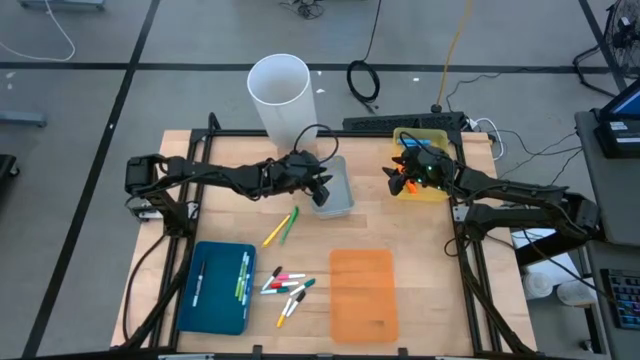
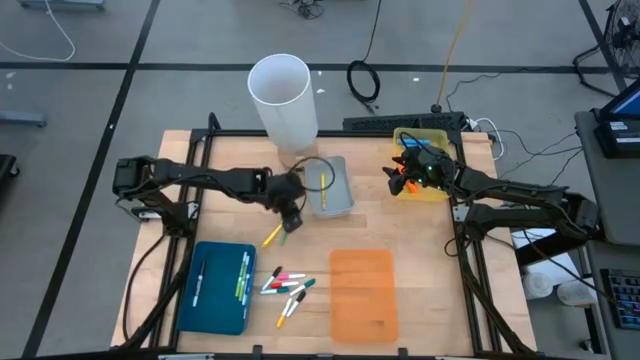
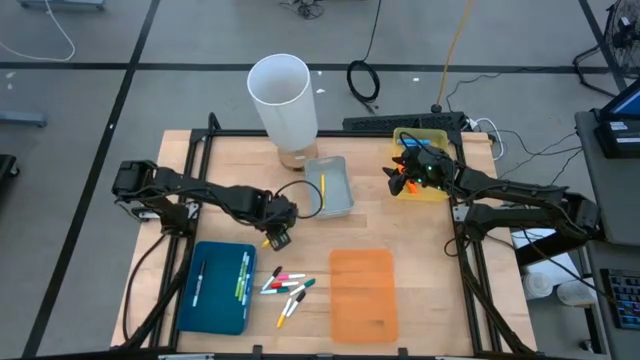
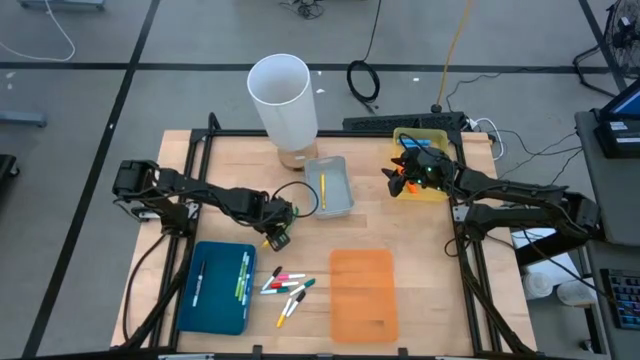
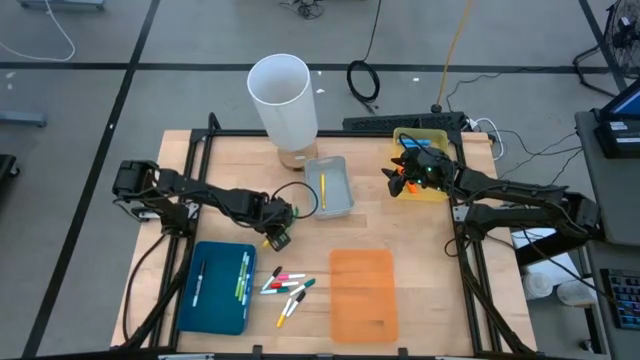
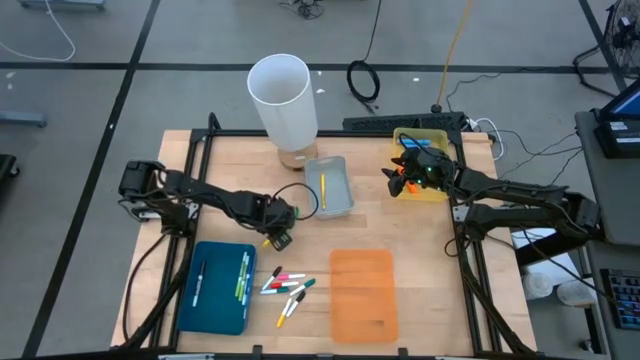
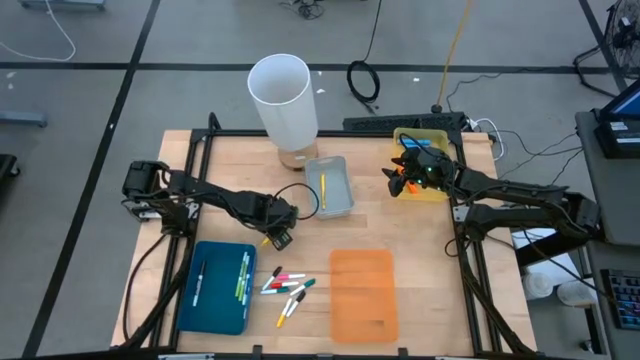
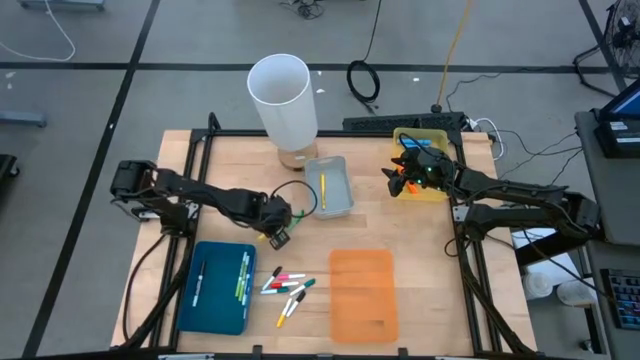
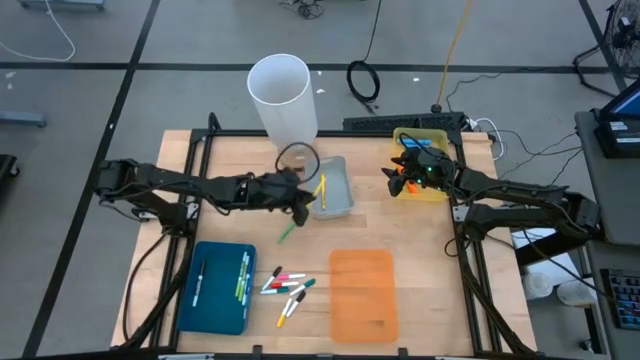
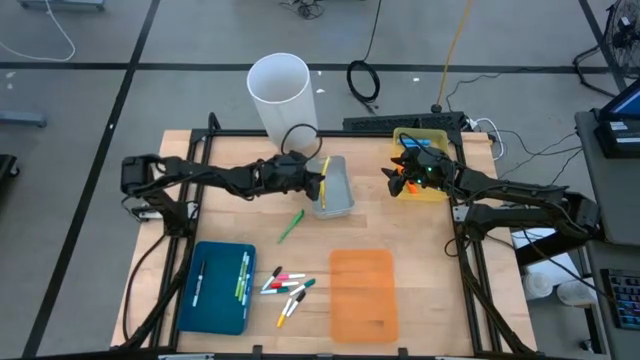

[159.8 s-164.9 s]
Task: Pick & Place Markers
Put the yellow pen in the gray bin

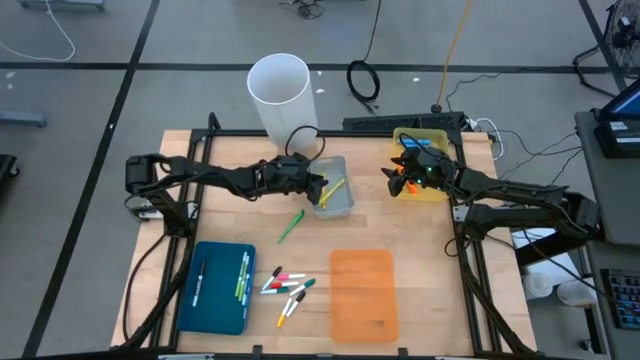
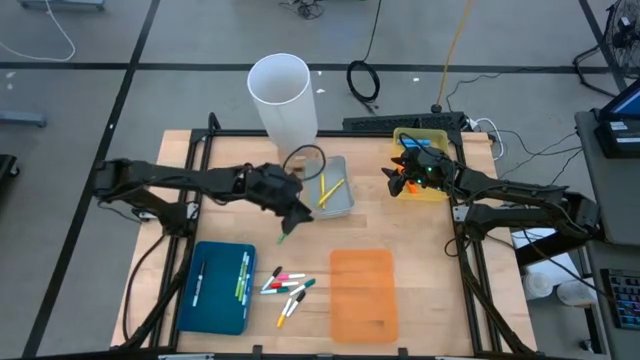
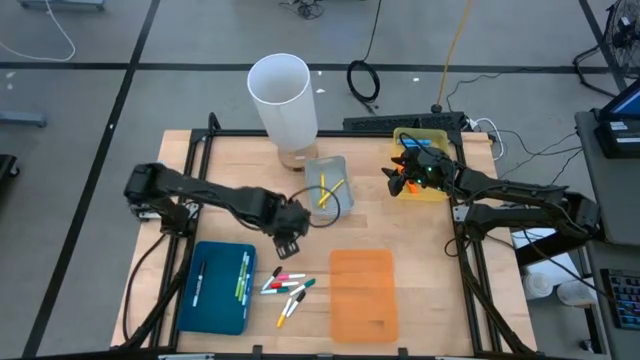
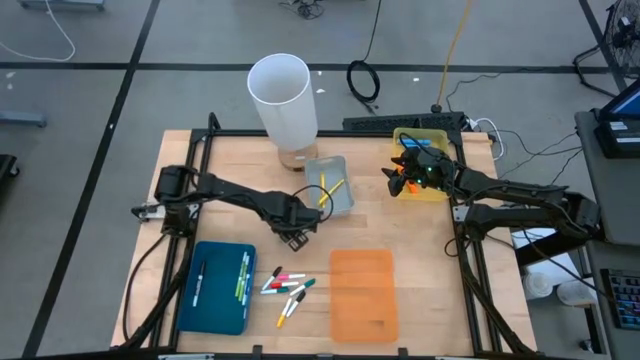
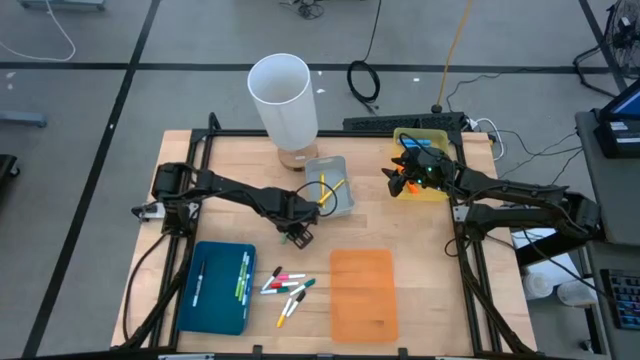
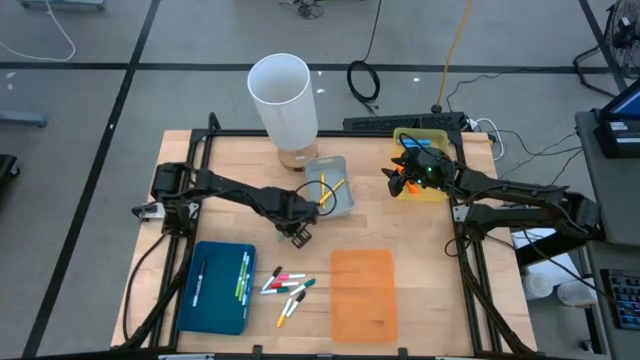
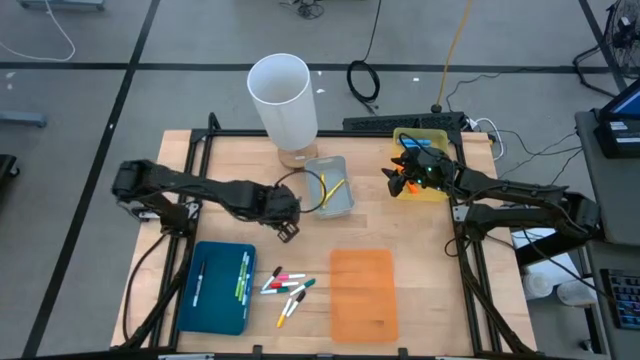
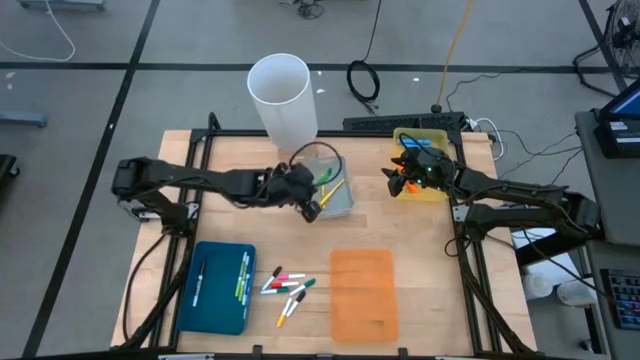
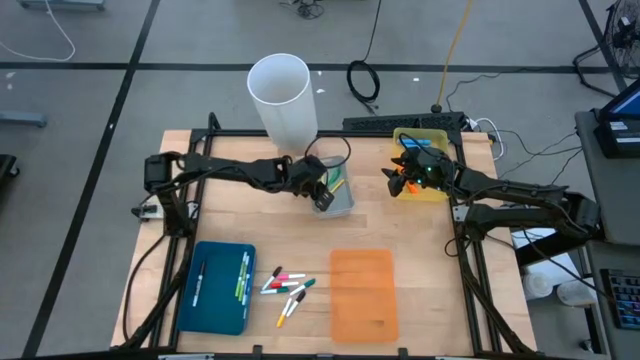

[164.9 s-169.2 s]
Put the green pen in the gray bin

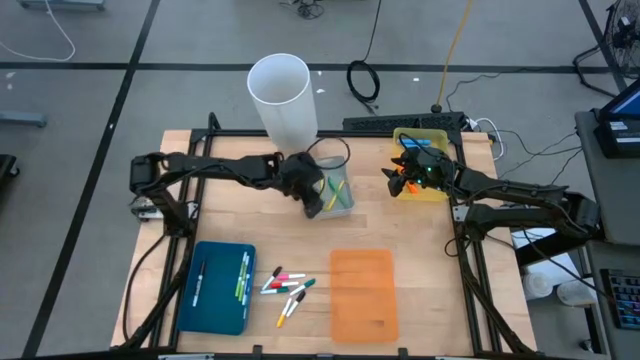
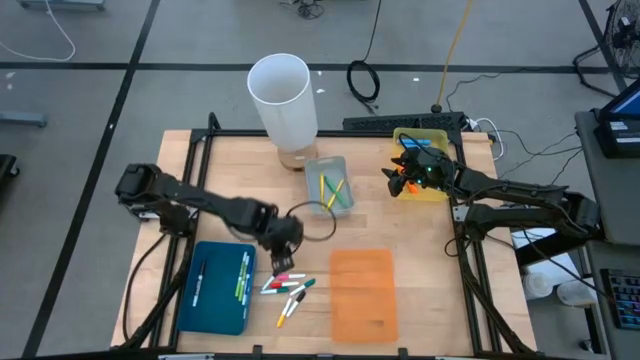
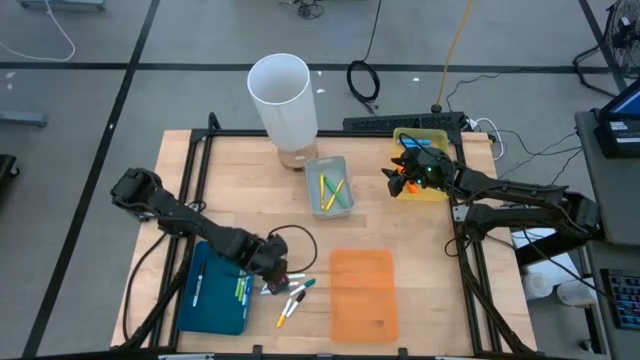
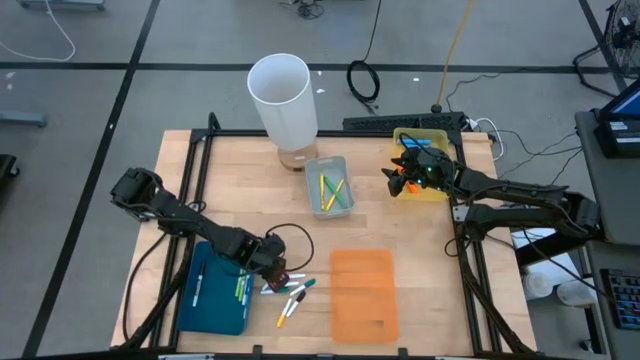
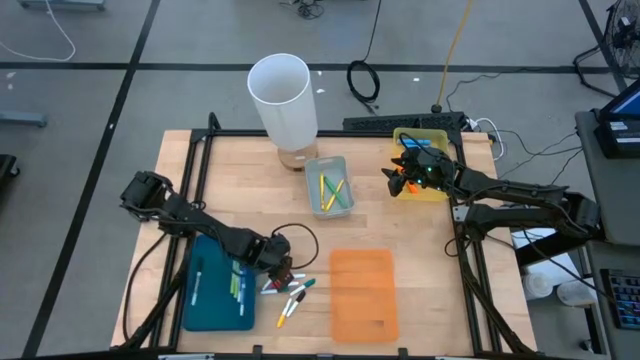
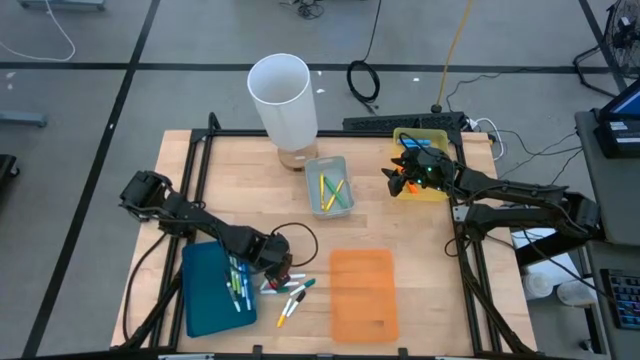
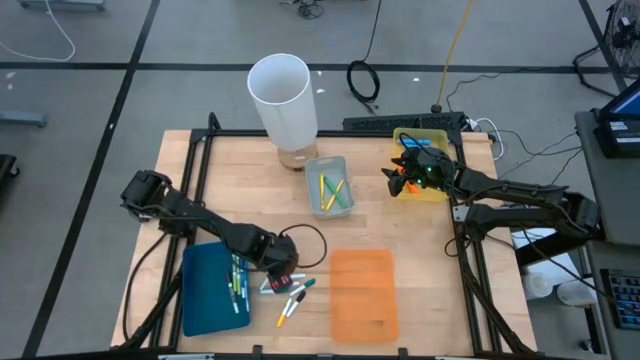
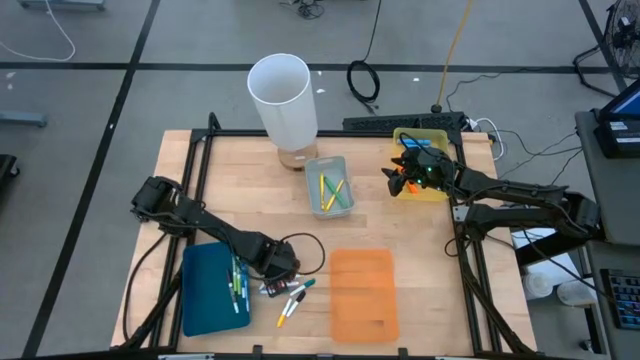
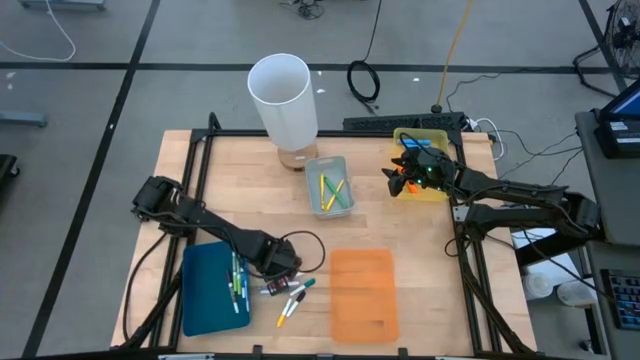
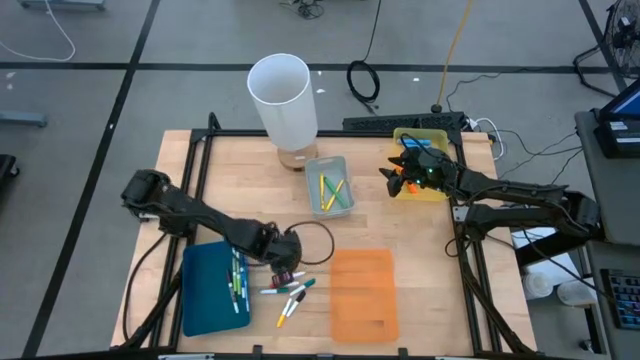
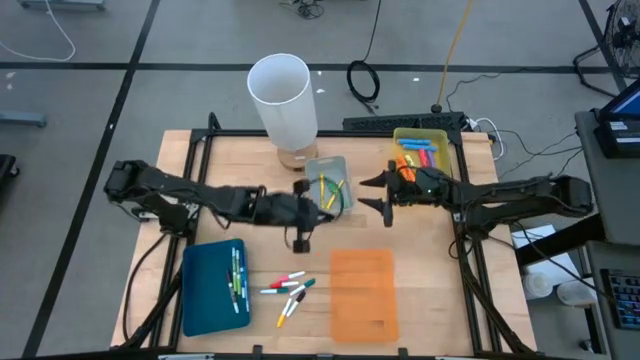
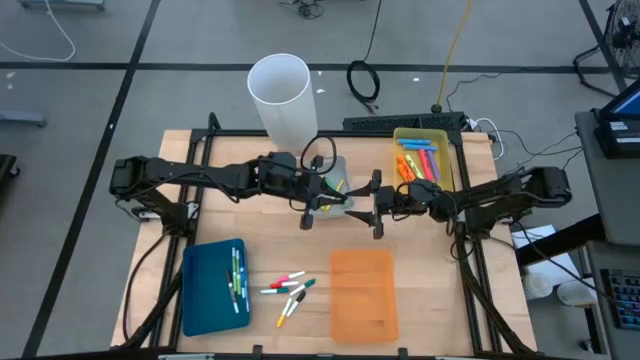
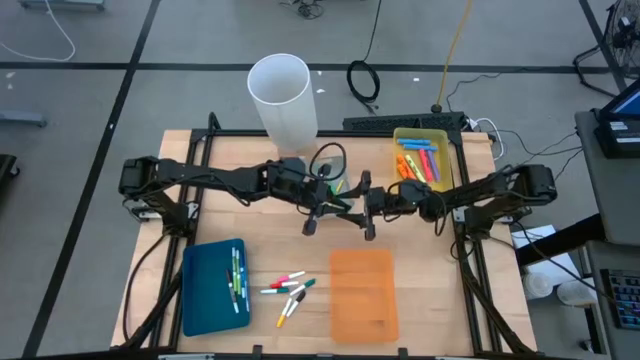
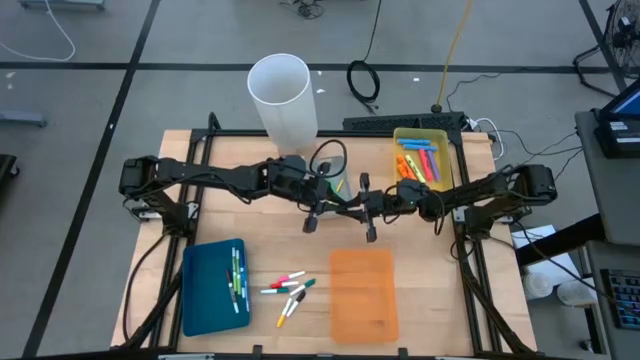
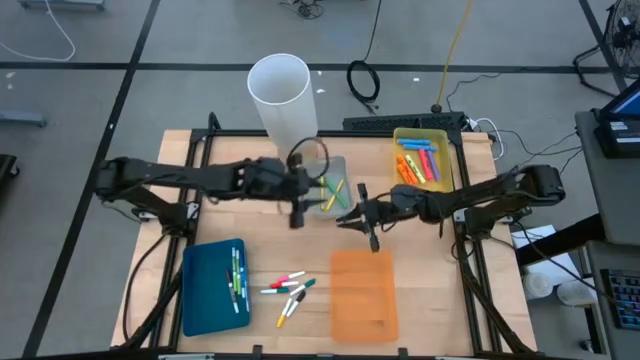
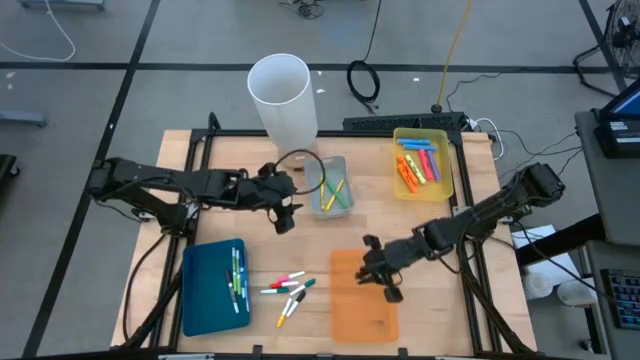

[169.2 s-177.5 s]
Put the top small black highlighter pen in the orange bin

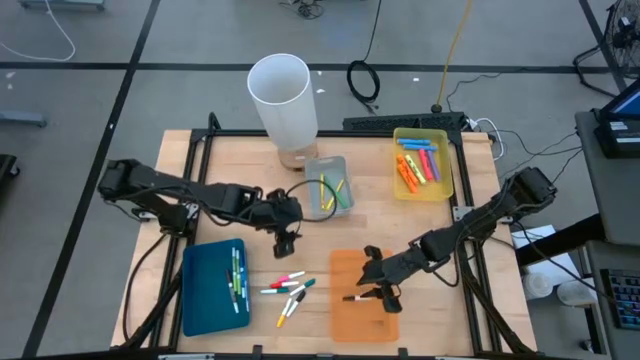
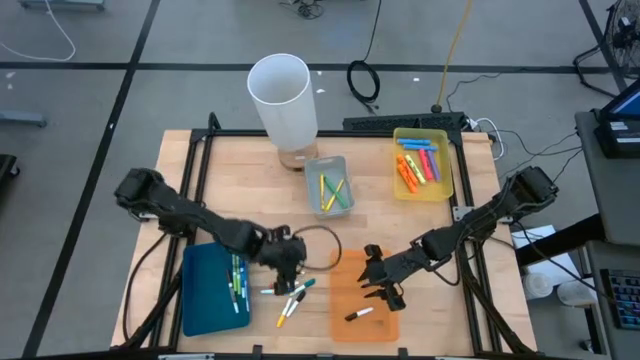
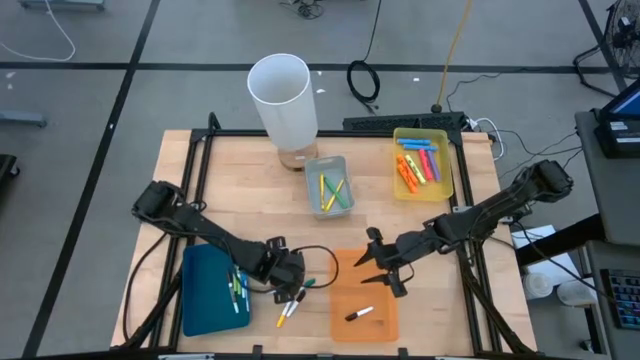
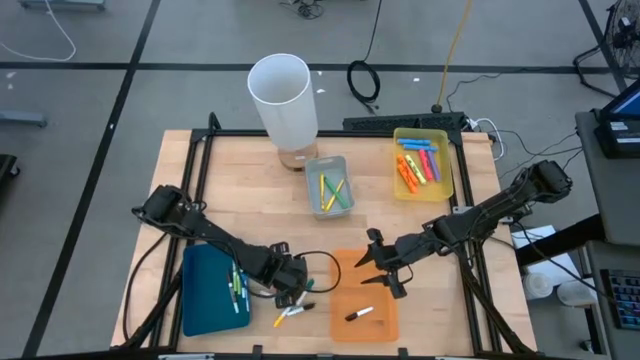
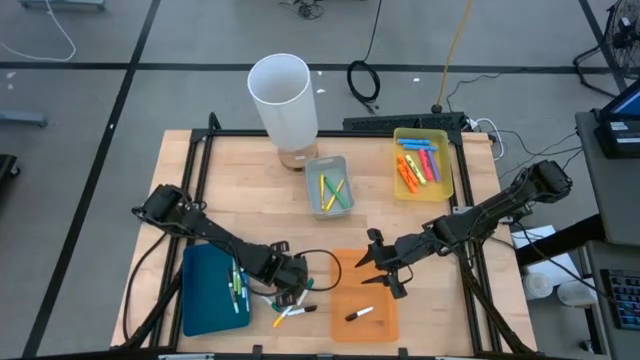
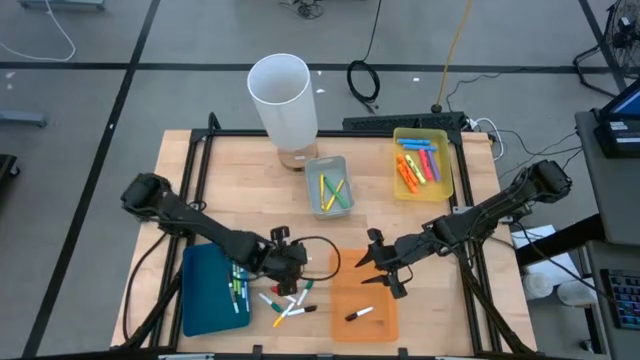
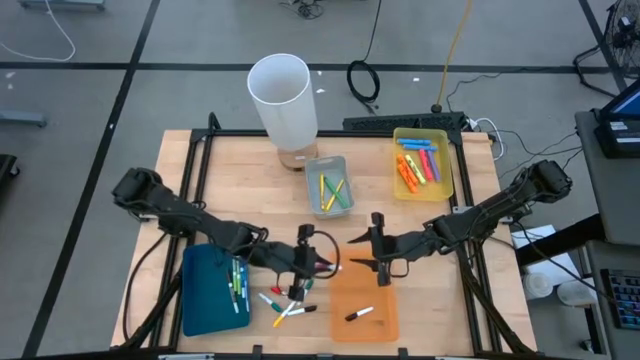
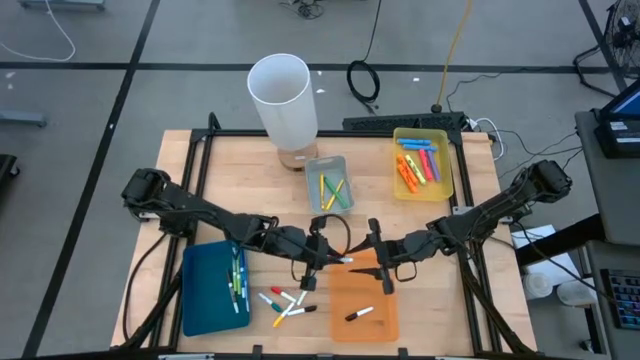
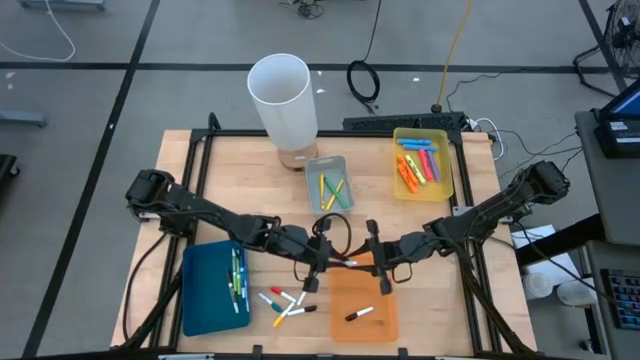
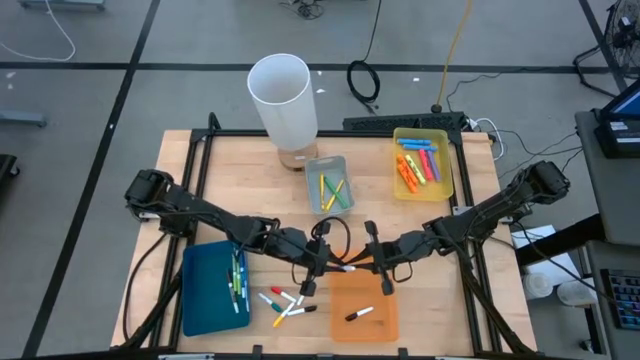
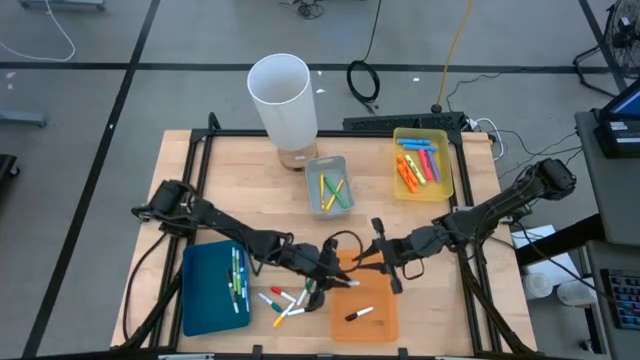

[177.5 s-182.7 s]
Put the small pink highlighter pen in the orange bin
